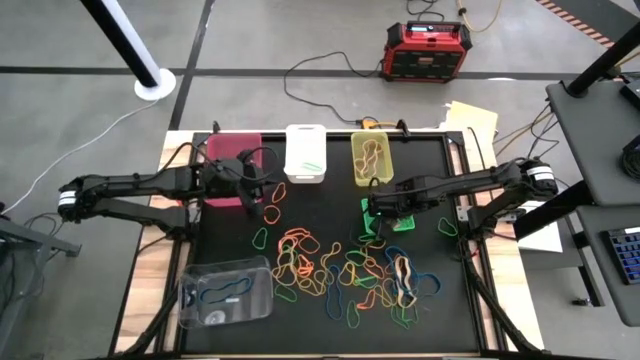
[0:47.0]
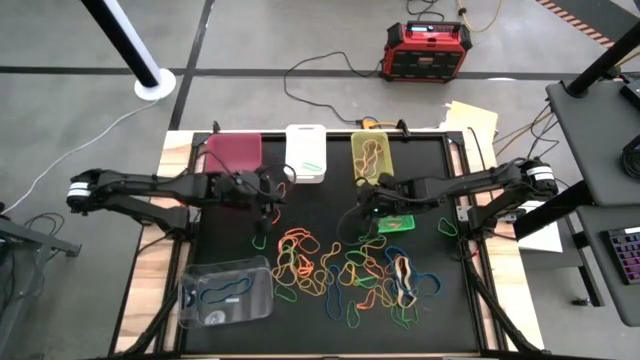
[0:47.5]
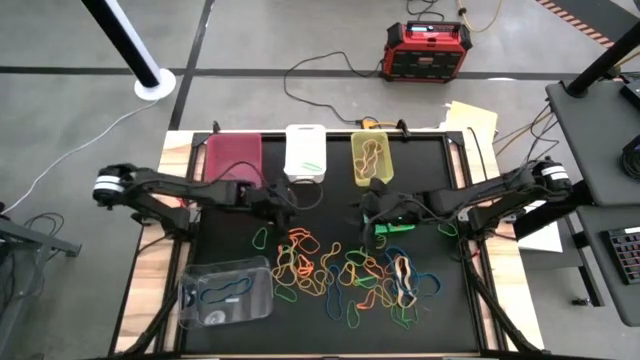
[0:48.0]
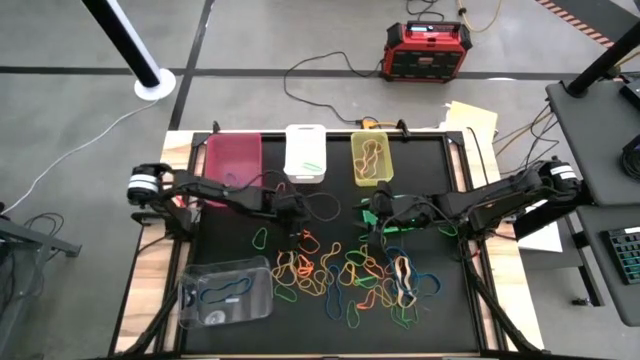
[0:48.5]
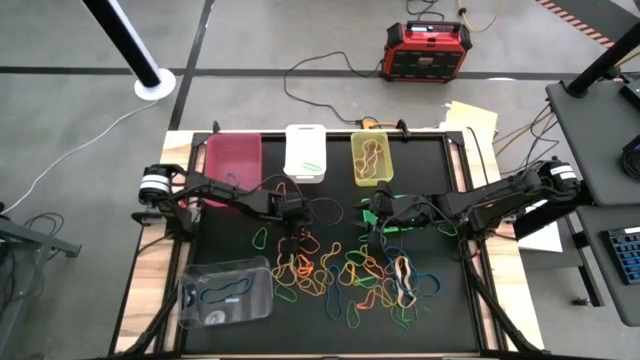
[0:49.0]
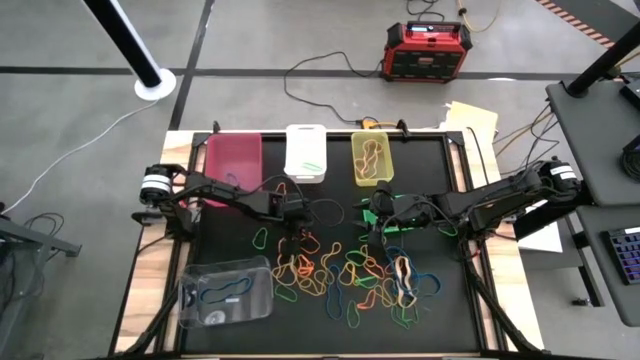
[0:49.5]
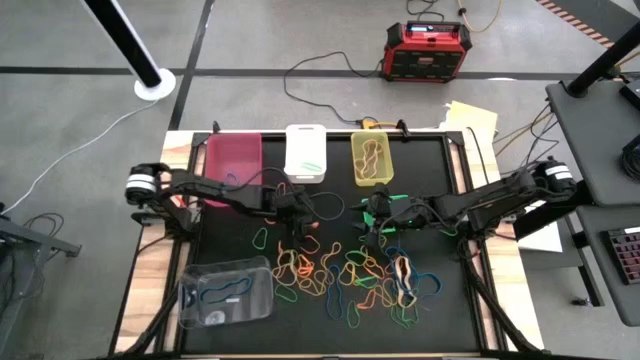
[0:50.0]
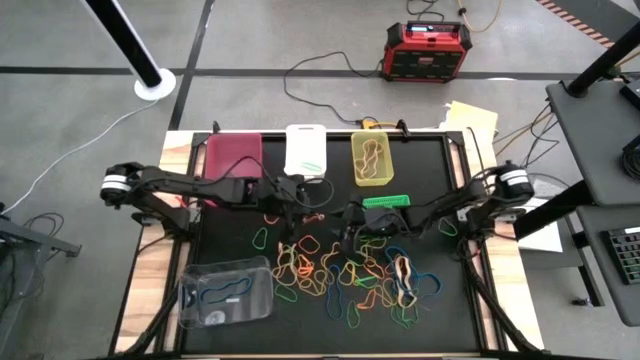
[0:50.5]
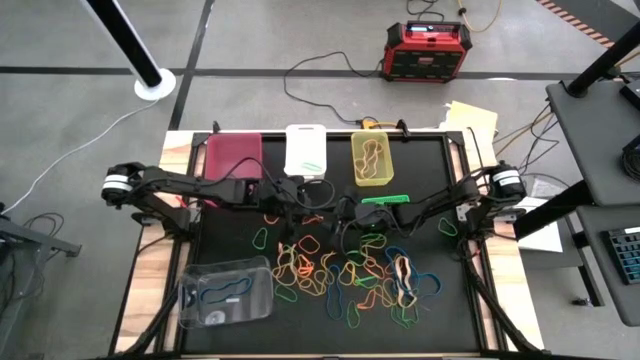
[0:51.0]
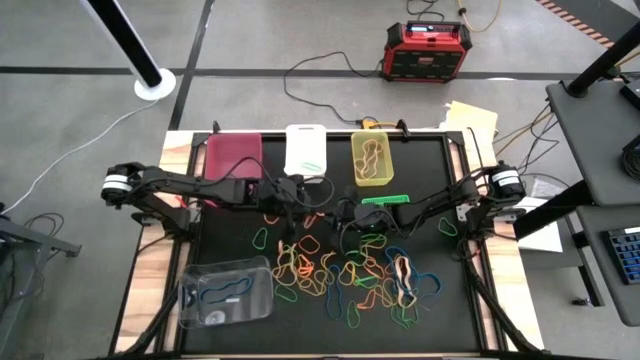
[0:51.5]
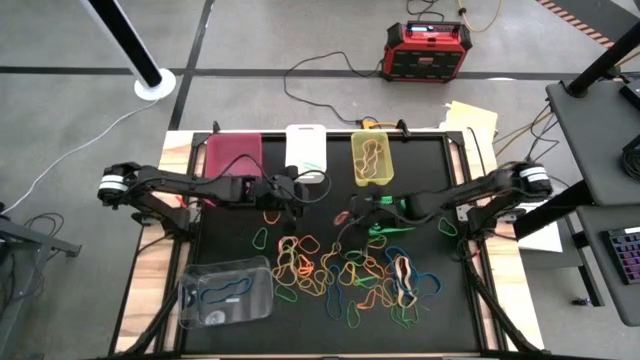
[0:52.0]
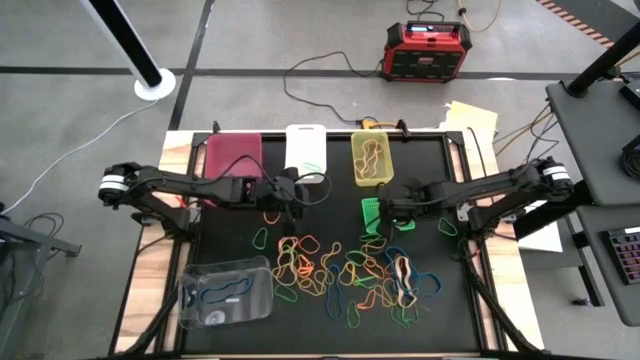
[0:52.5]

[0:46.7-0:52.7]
Task: Sort rubber bands into baskets
Put the orange rubber band into the green bin

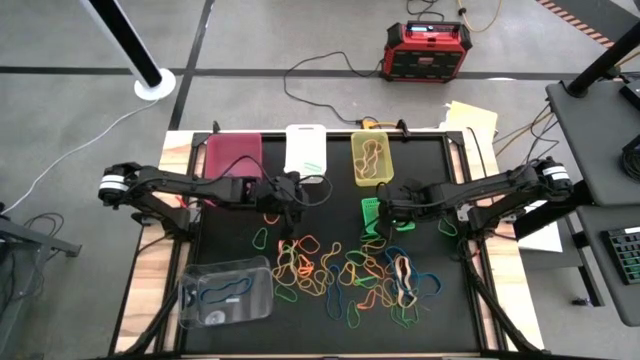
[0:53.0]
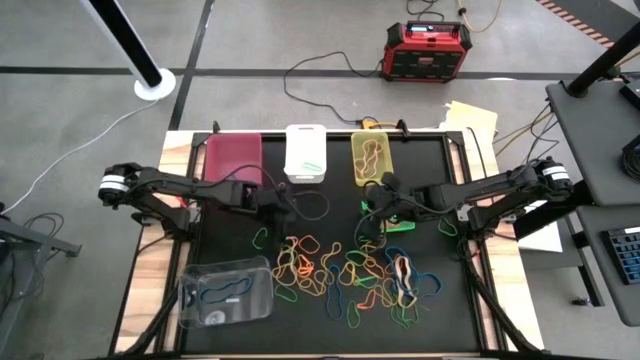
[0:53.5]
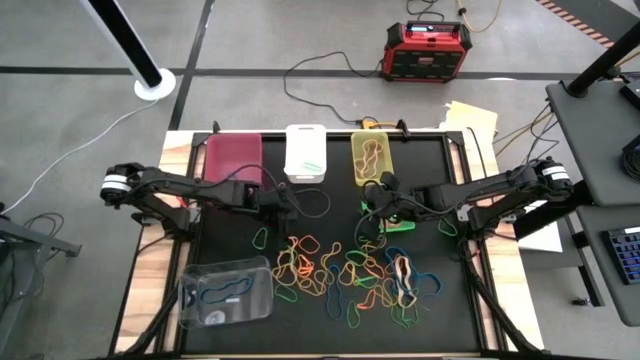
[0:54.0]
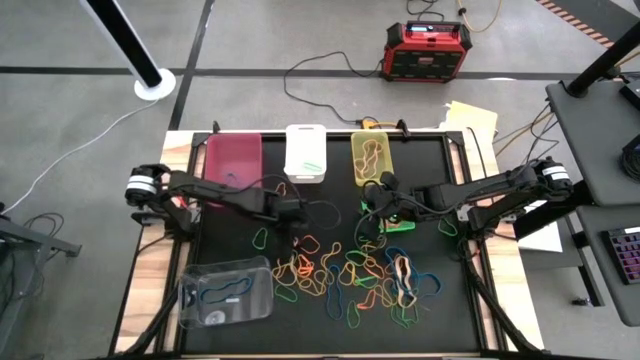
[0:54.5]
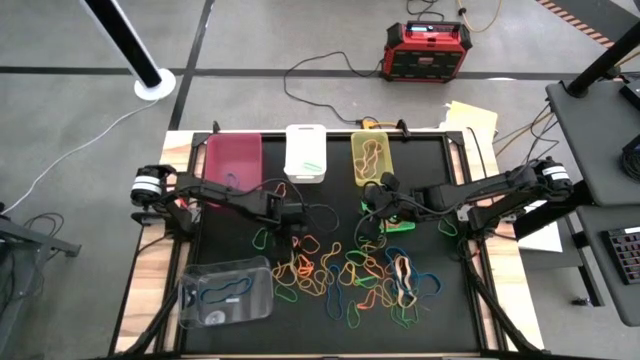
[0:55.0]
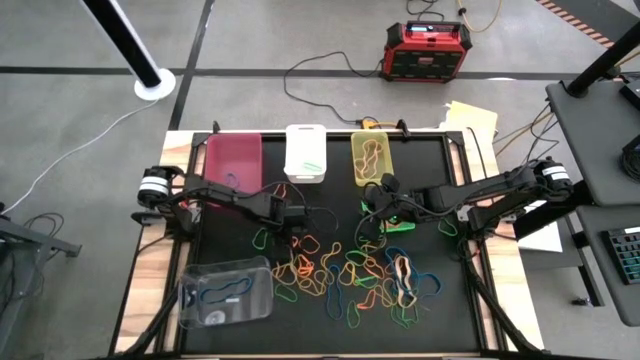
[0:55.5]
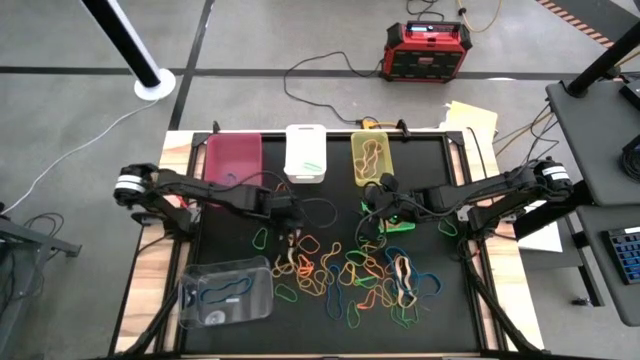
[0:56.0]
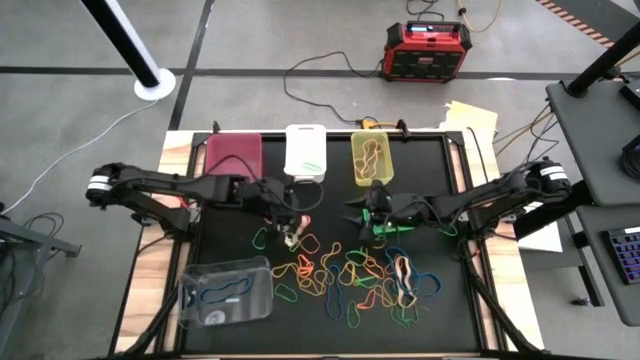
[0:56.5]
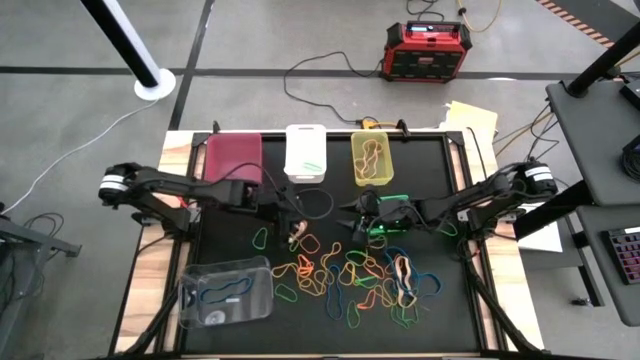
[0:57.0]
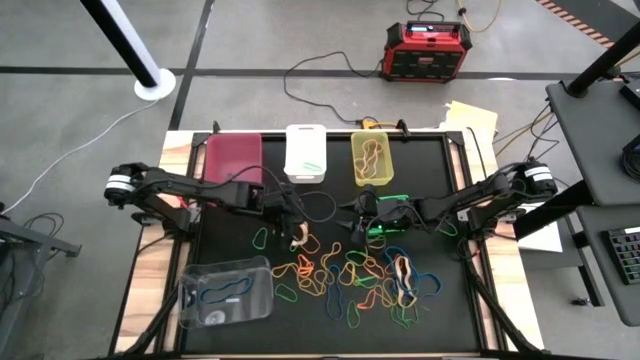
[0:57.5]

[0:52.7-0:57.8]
Put the brown rubber band into the yellow bin

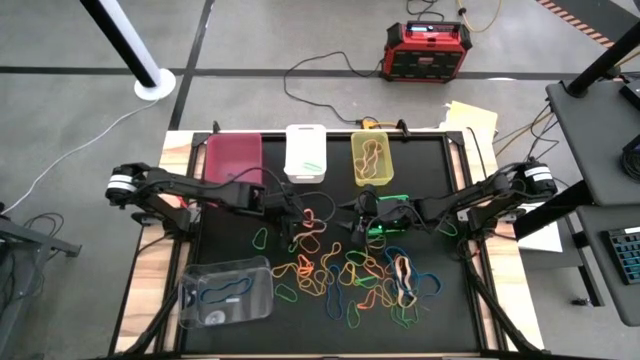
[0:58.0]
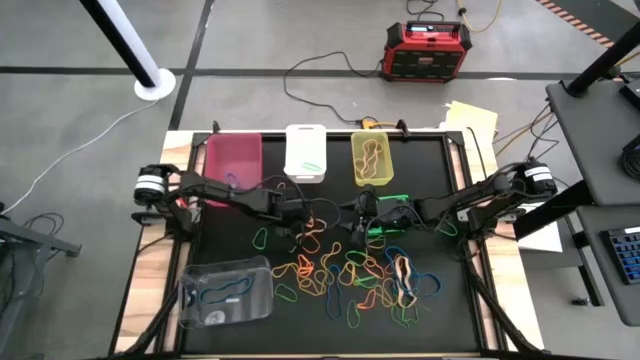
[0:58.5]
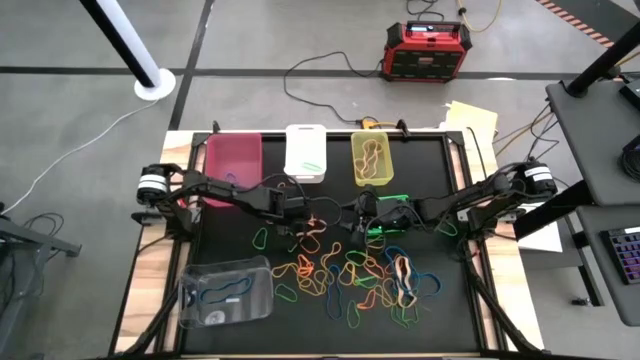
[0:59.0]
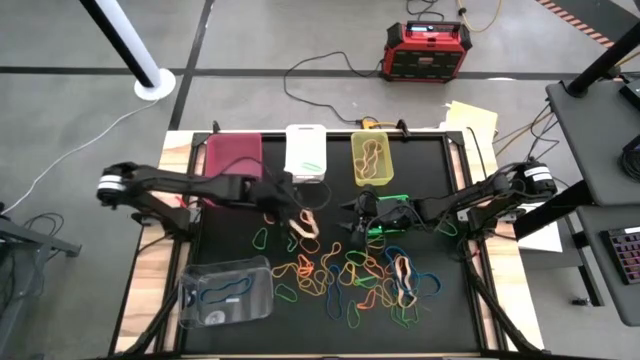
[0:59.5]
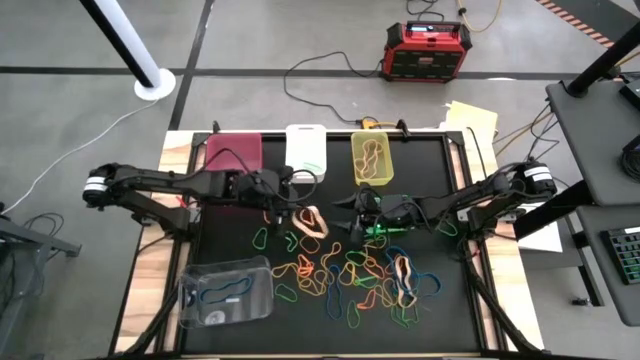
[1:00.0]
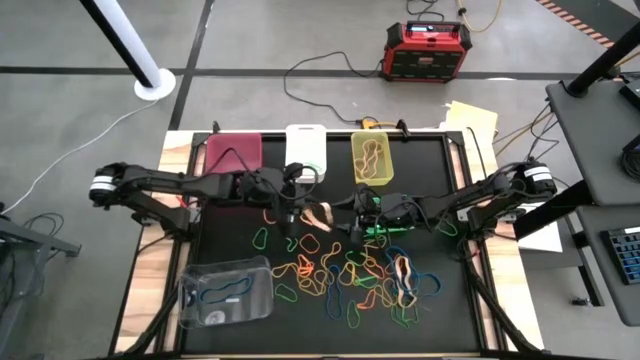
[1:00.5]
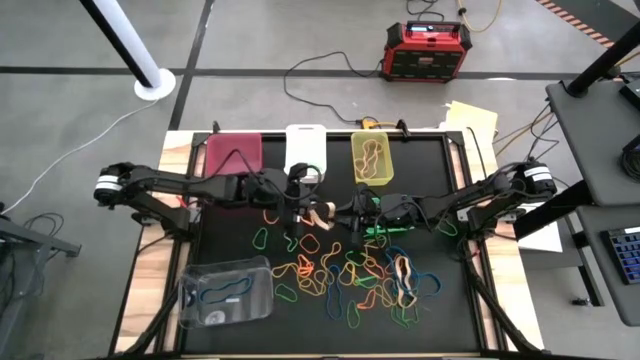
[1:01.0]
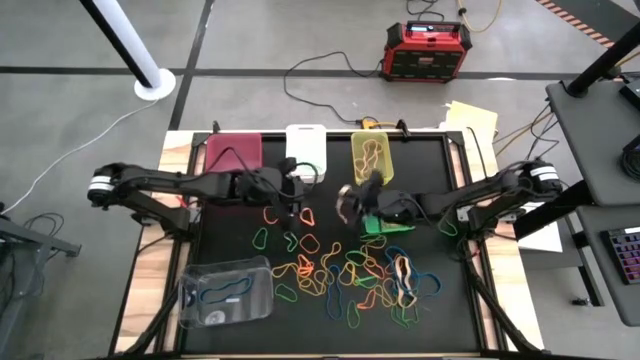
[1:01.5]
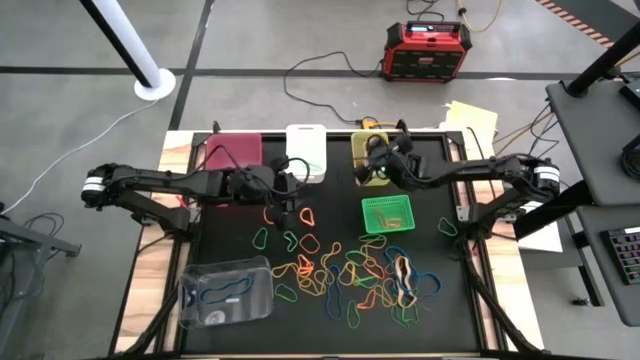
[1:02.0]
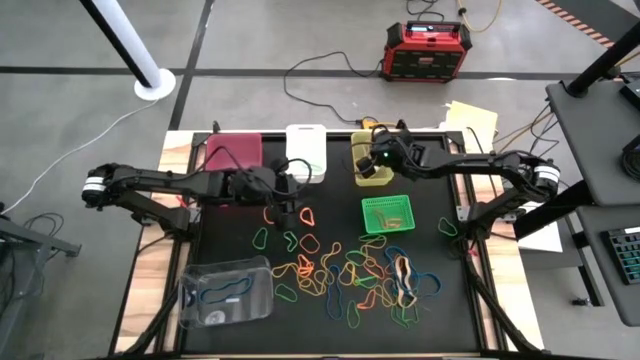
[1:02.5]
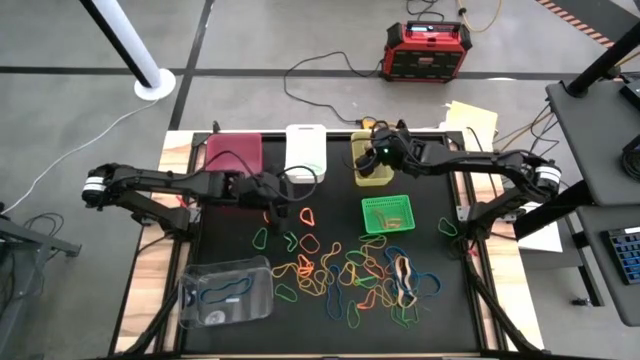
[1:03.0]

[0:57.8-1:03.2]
Put the brown rubber band into the yellow bin

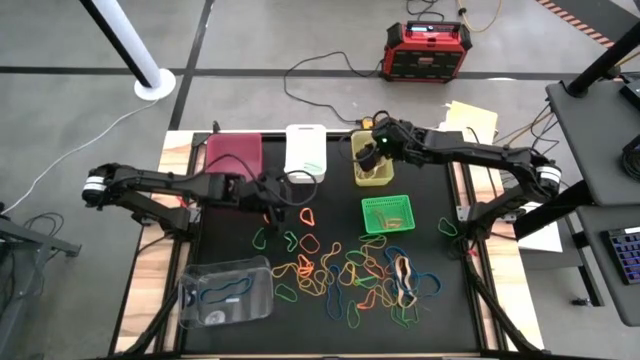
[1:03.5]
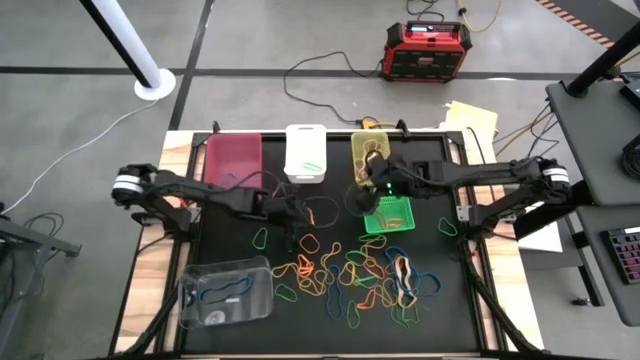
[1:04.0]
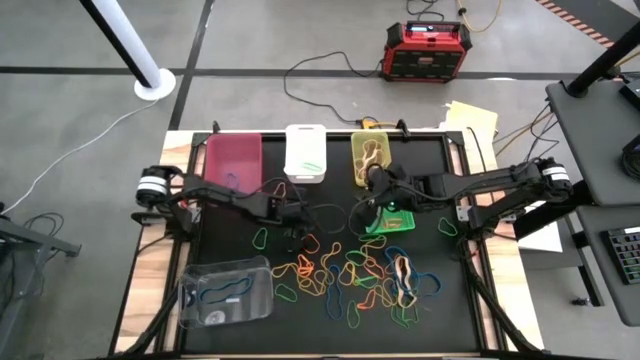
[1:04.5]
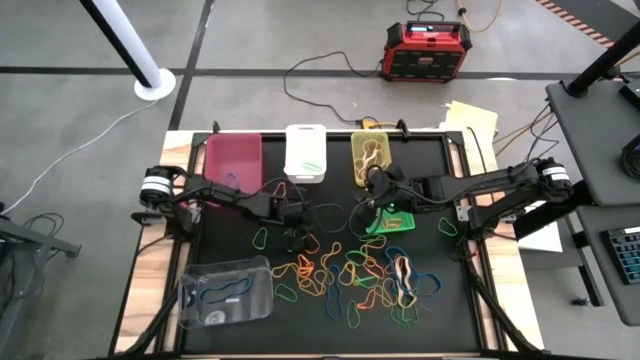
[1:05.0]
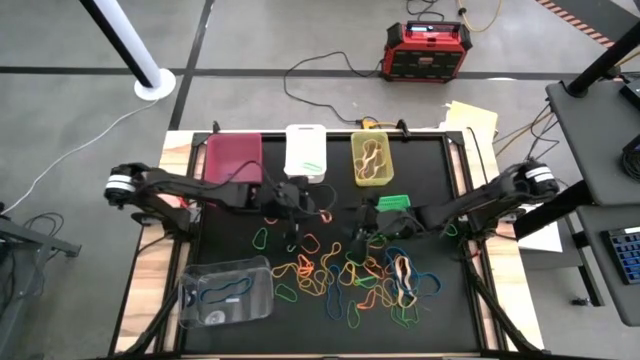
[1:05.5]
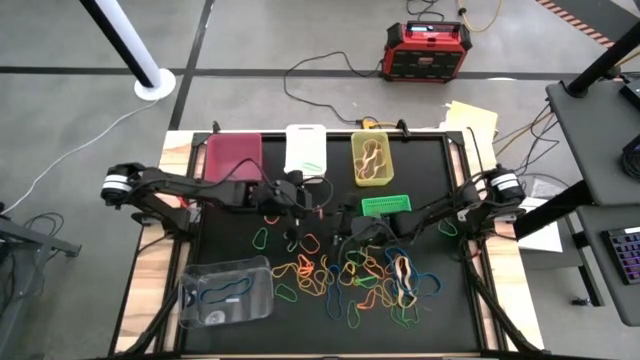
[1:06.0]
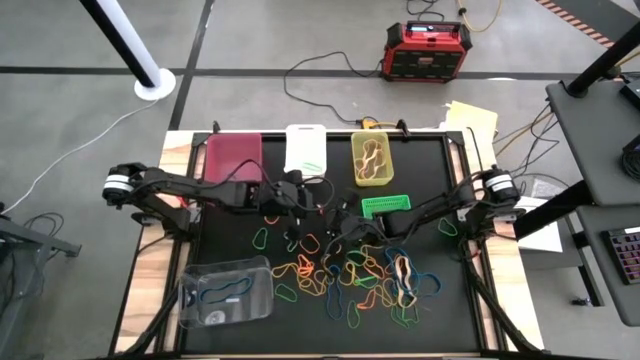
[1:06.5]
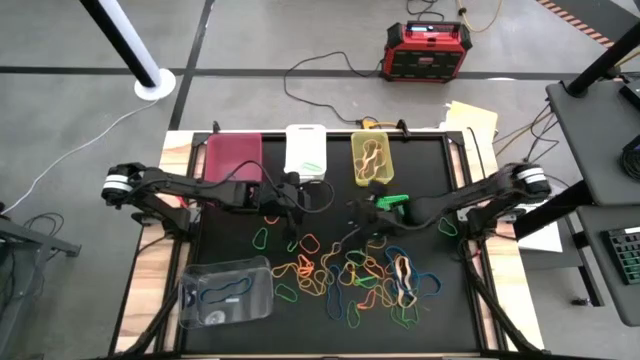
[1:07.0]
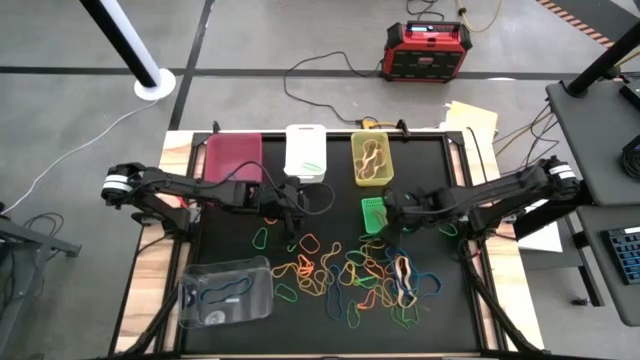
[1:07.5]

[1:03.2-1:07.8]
Put the orange rubber band into the green bin
